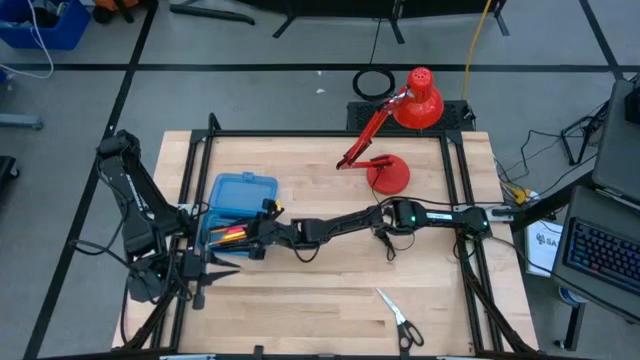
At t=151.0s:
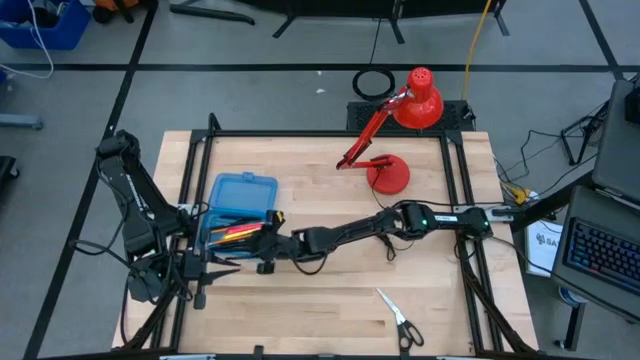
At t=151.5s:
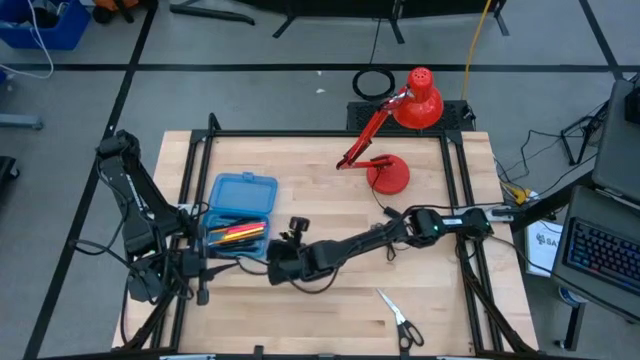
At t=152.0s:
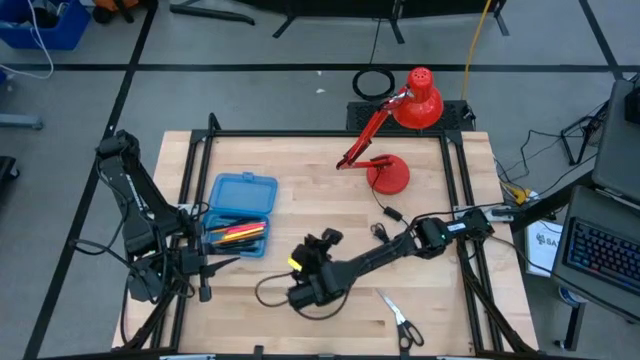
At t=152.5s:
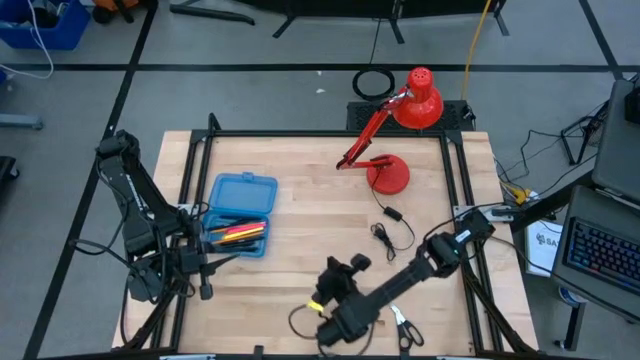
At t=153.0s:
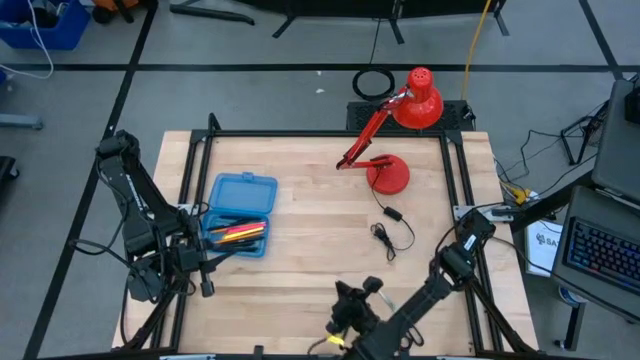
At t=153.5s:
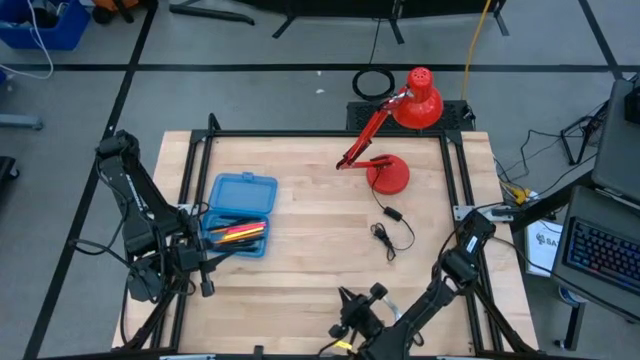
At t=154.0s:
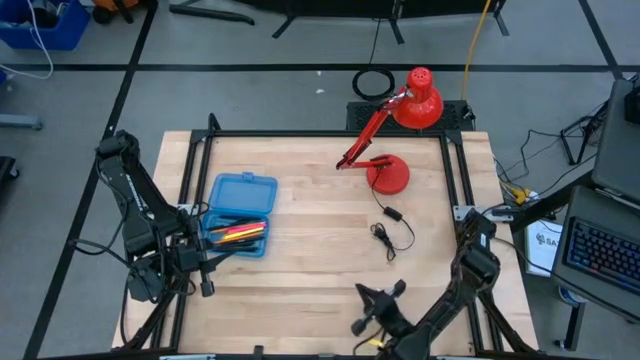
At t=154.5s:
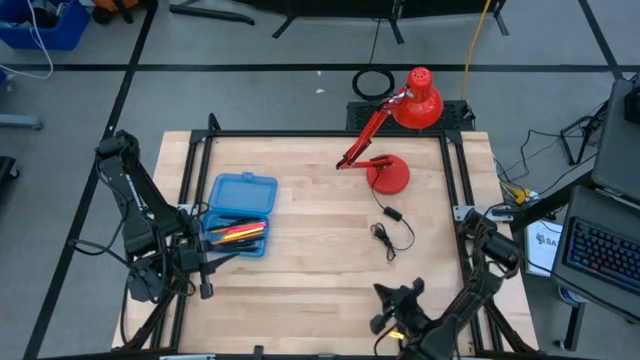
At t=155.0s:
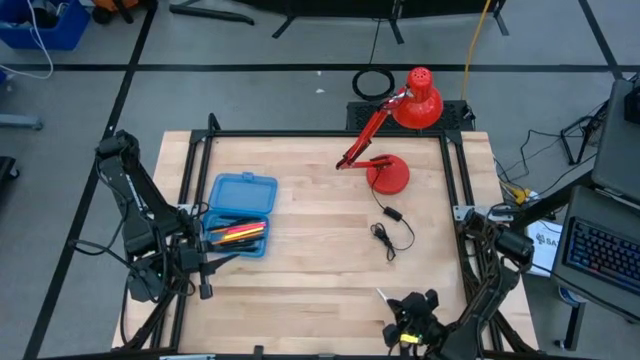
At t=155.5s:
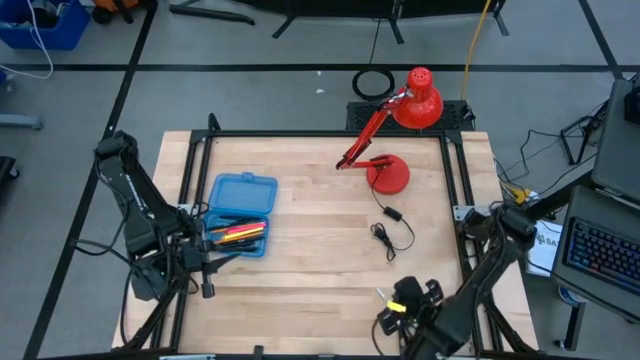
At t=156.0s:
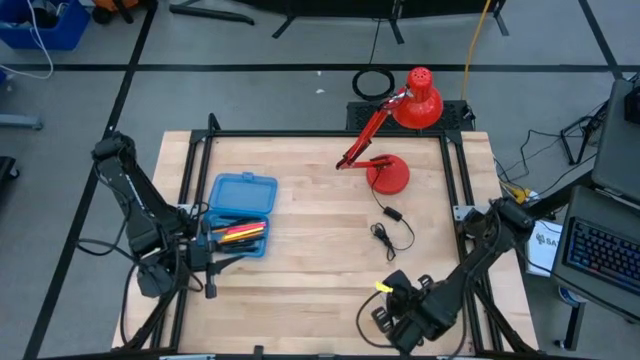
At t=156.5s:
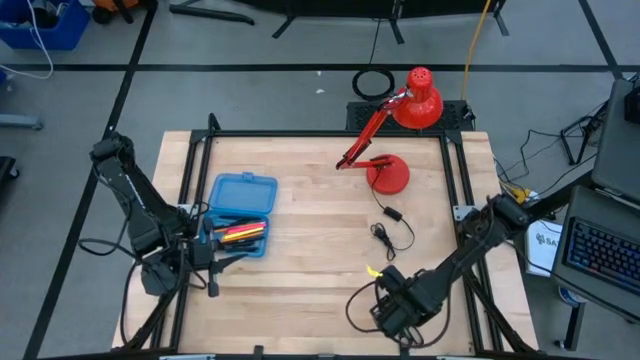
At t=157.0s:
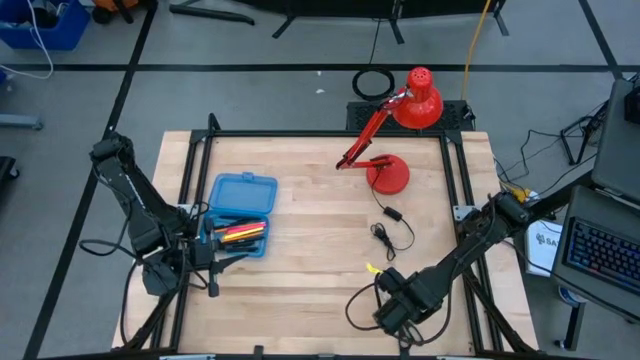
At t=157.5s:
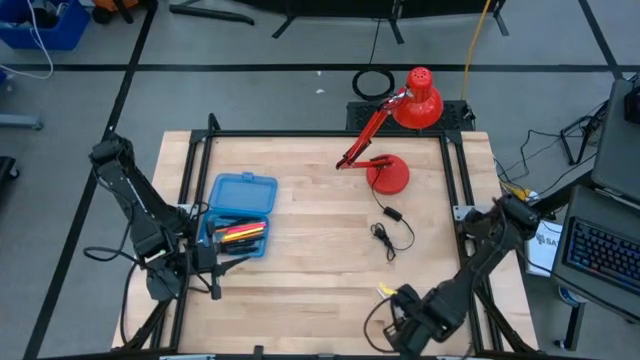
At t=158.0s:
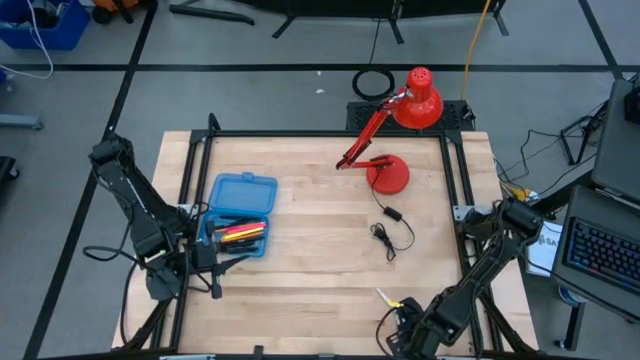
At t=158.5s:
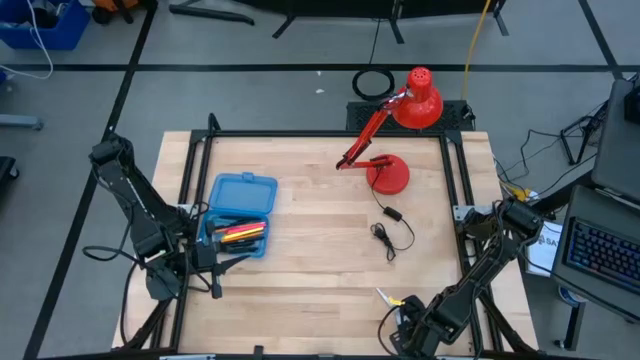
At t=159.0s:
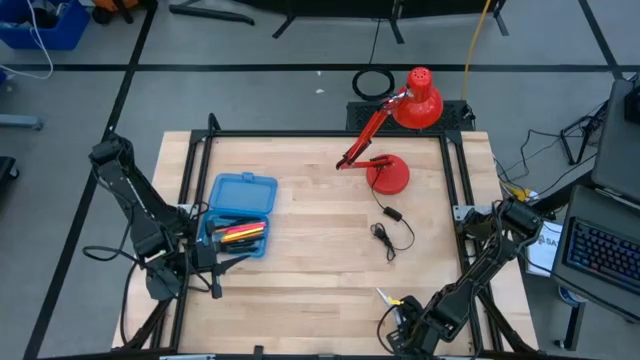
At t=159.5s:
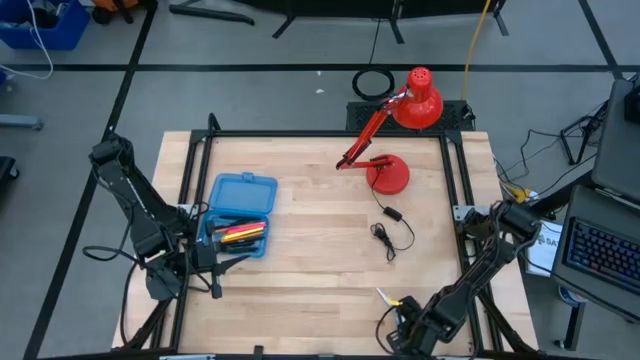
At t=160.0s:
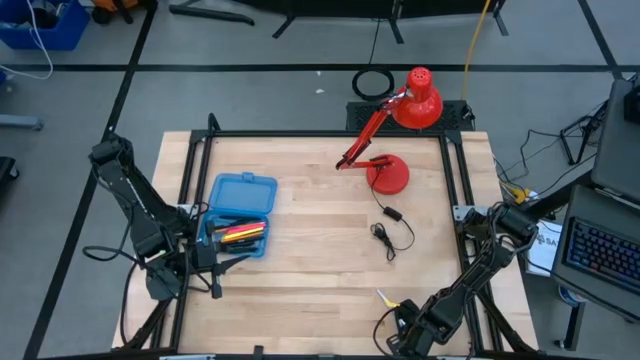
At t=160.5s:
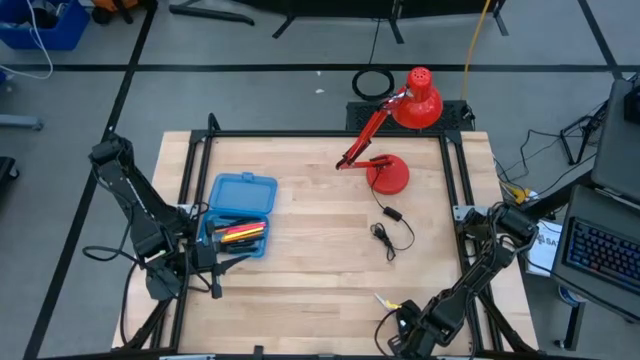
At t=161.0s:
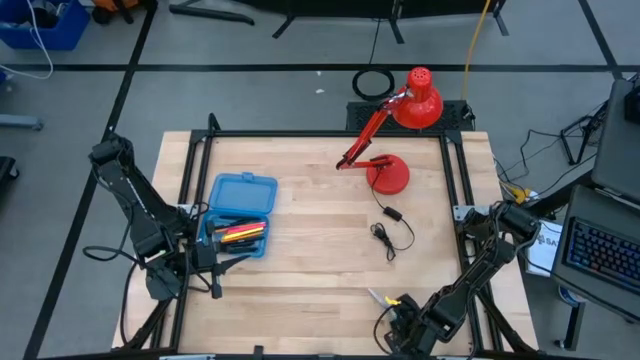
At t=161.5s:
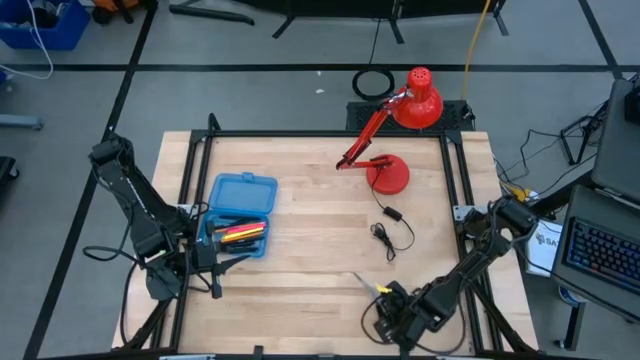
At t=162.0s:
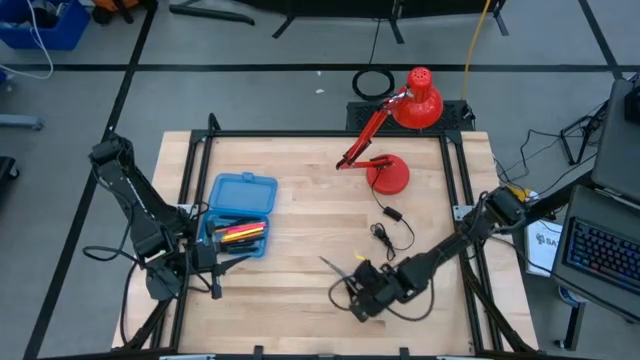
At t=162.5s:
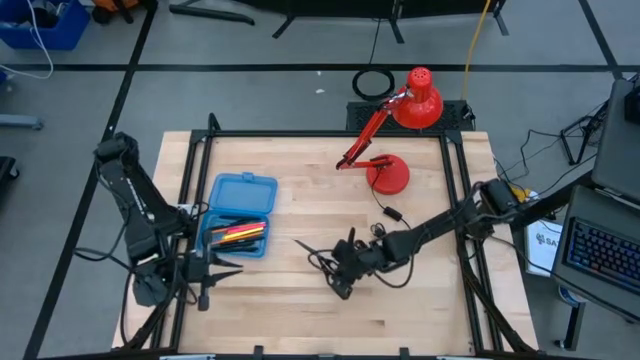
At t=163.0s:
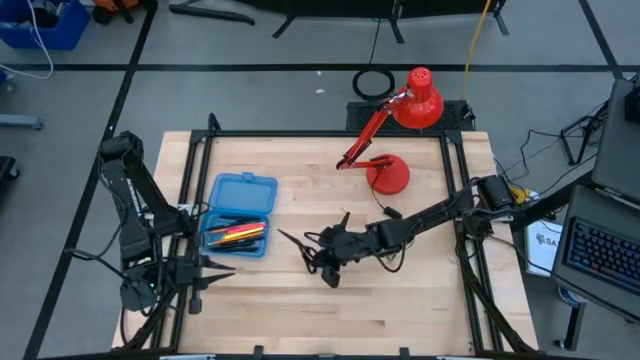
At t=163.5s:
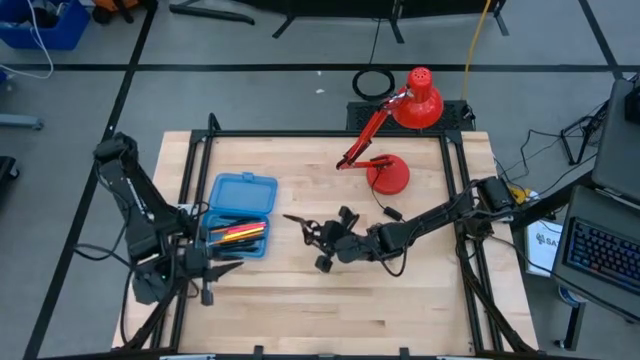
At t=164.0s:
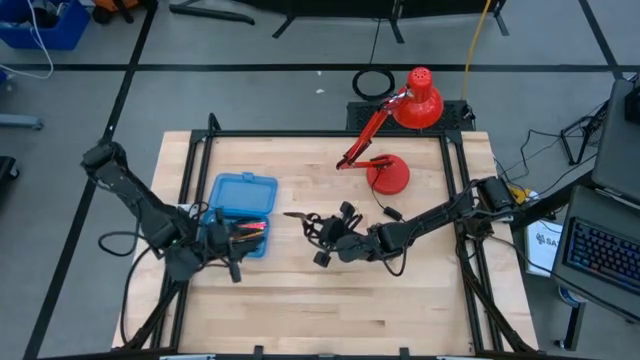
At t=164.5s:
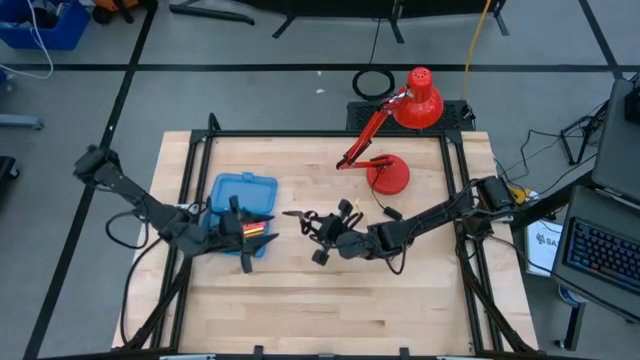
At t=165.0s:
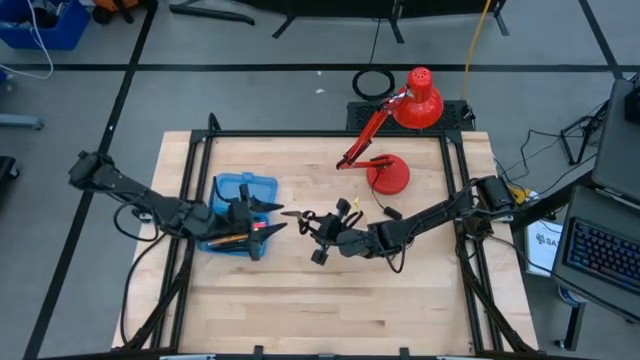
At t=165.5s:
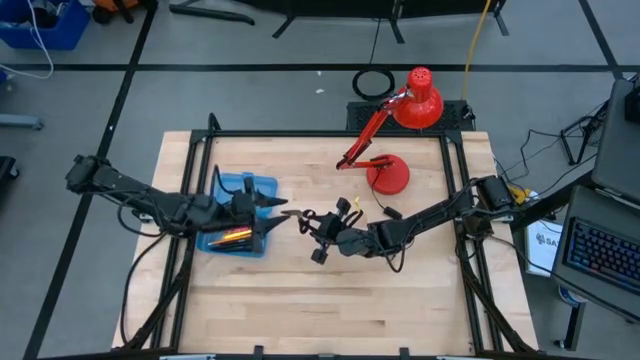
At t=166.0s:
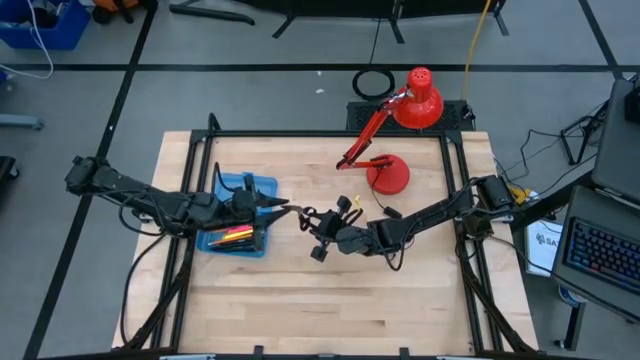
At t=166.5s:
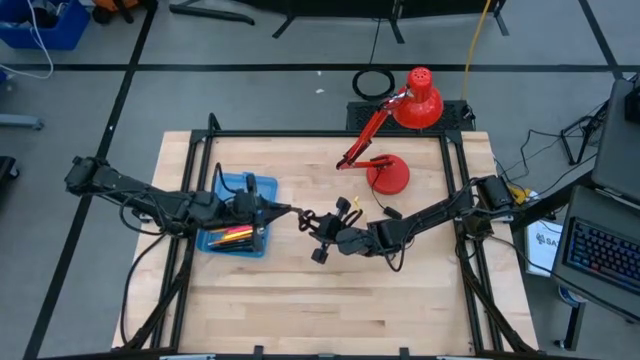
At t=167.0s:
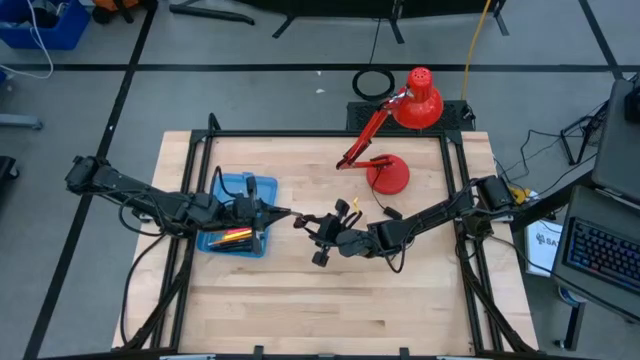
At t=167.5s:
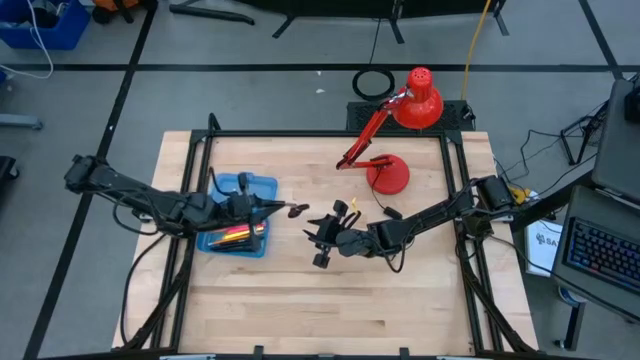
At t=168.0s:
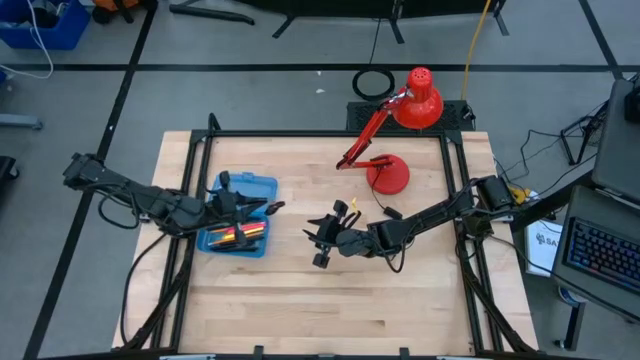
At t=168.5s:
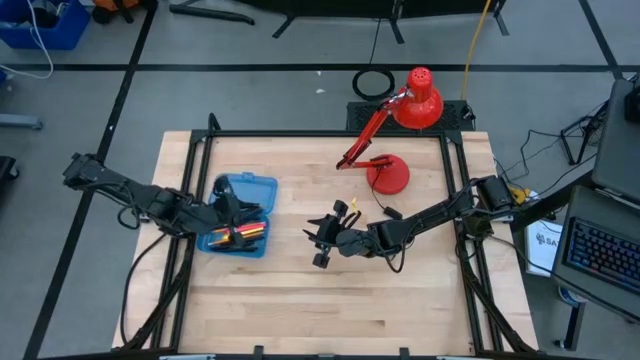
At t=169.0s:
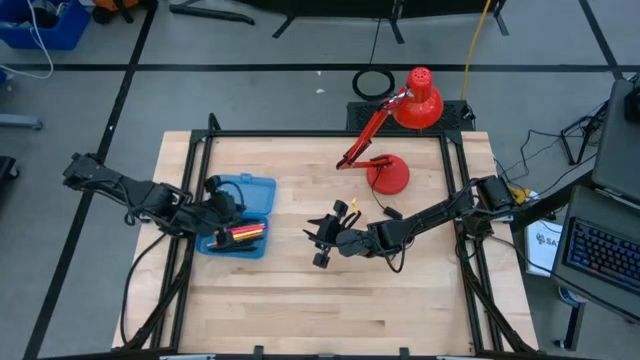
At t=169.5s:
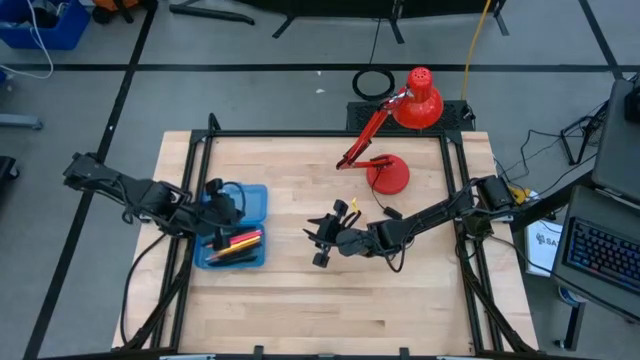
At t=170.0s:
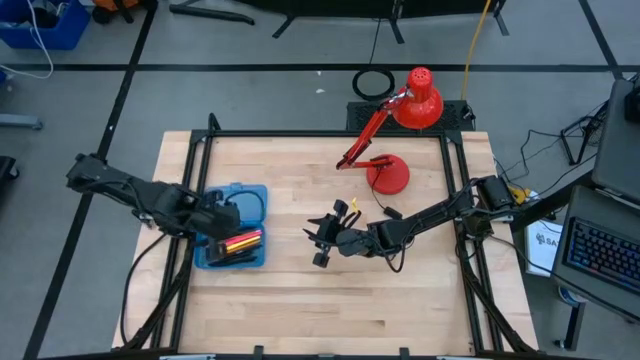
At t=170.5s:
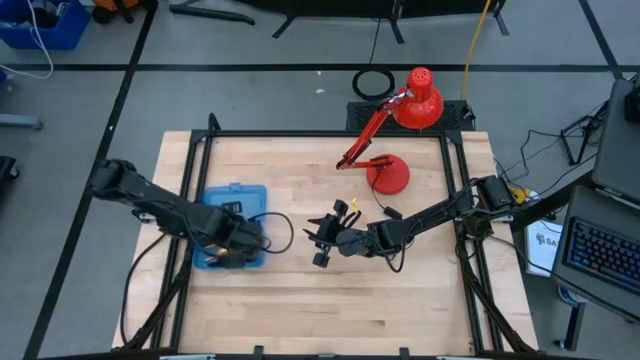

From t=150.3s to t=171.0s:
Task: Pick & place school supplies into a supply box
Put the black scissor into the supply box
